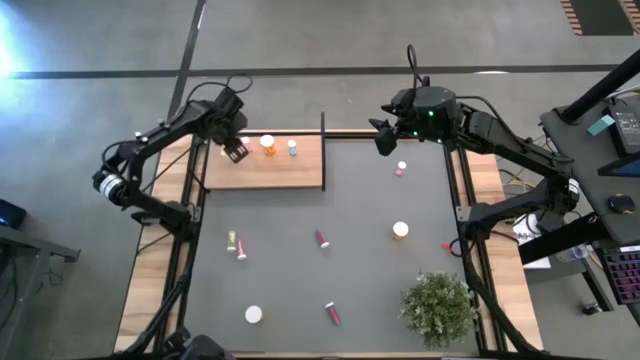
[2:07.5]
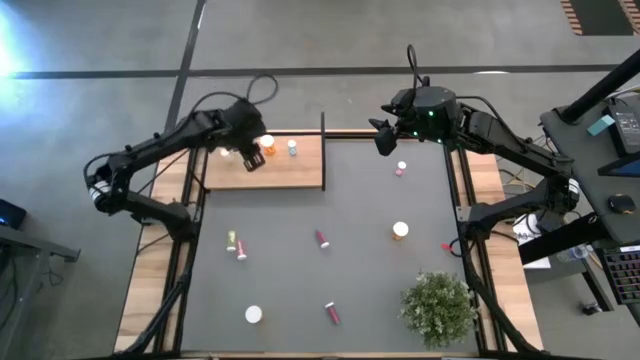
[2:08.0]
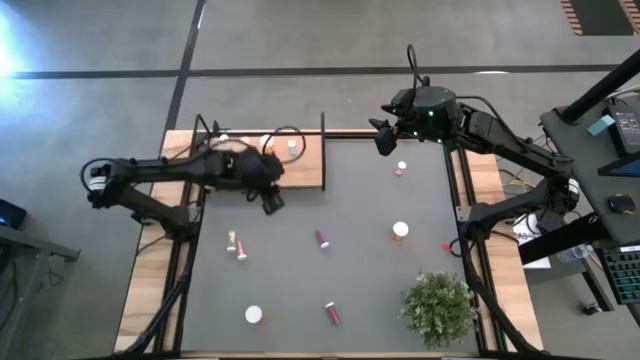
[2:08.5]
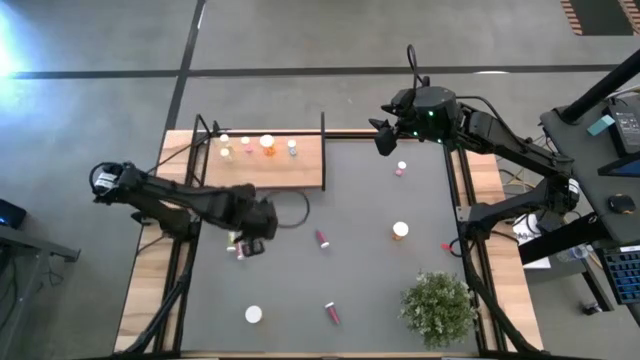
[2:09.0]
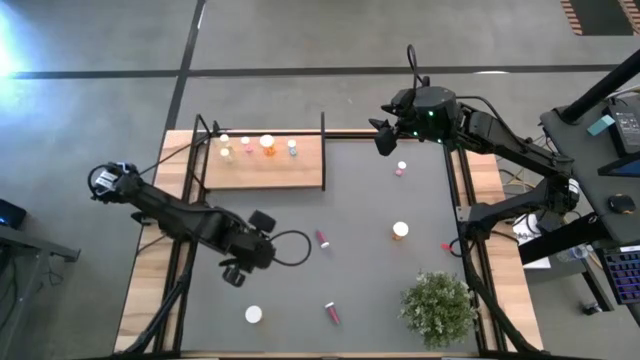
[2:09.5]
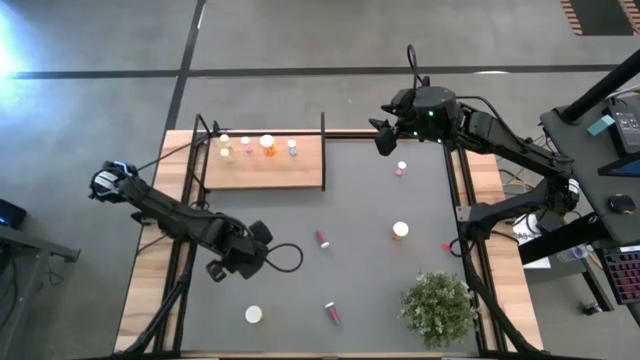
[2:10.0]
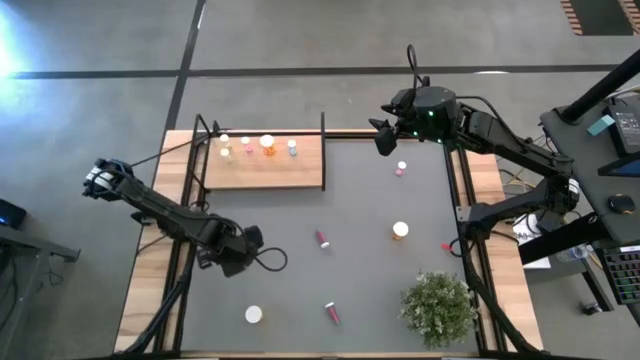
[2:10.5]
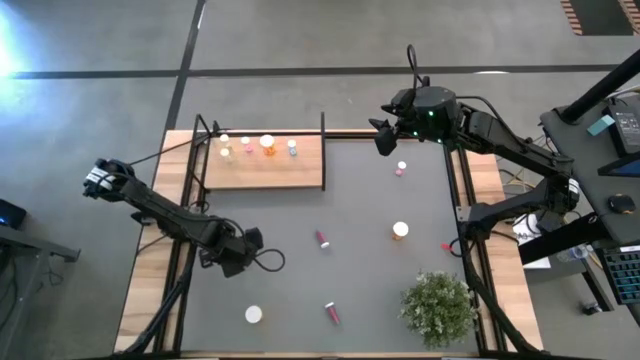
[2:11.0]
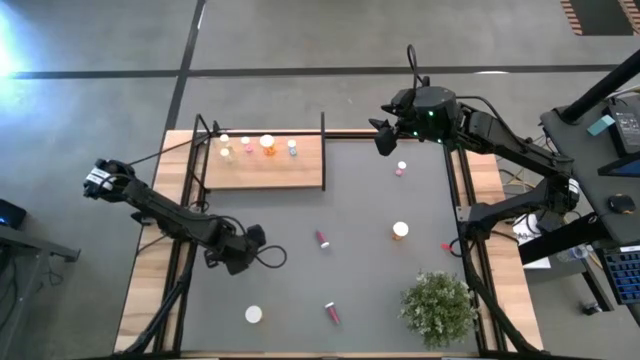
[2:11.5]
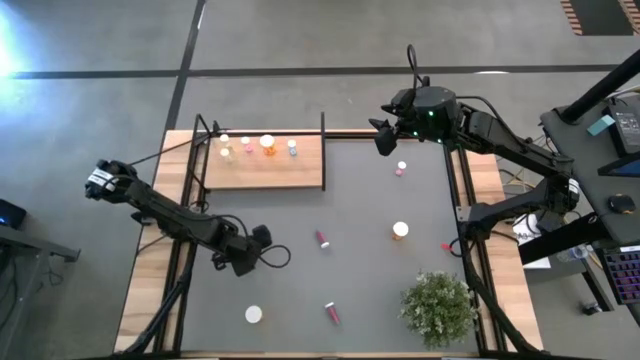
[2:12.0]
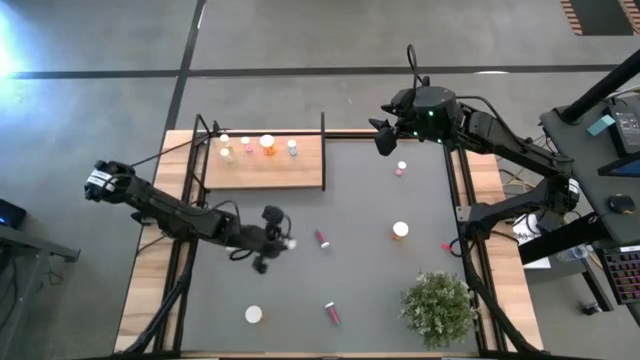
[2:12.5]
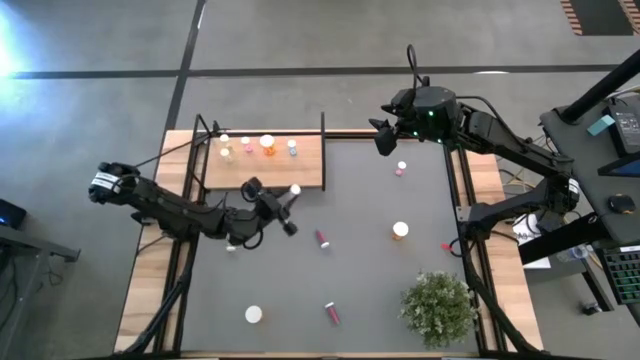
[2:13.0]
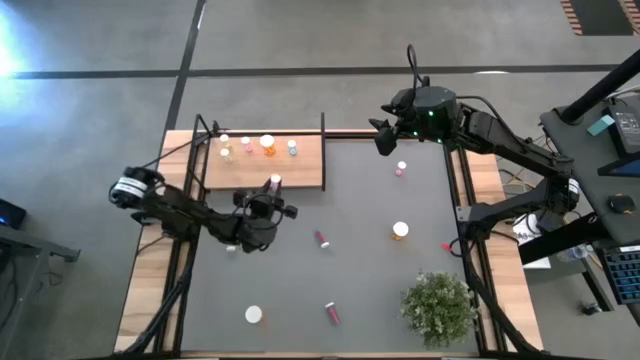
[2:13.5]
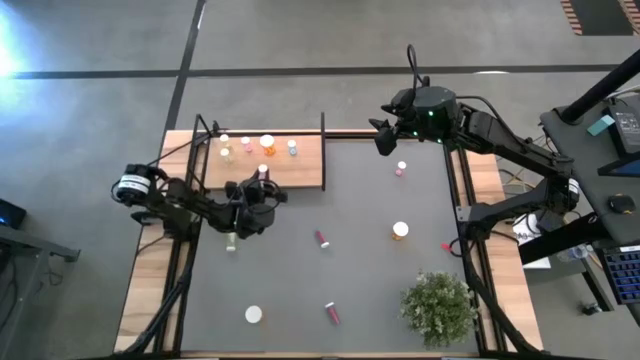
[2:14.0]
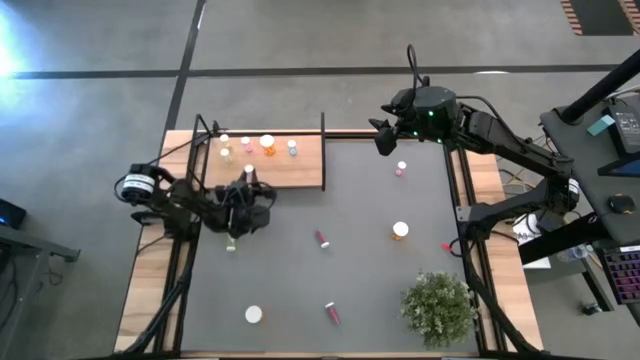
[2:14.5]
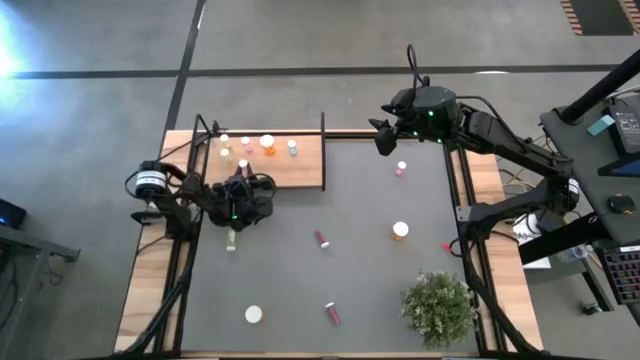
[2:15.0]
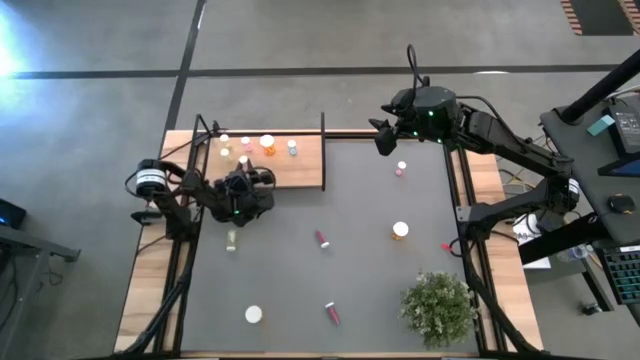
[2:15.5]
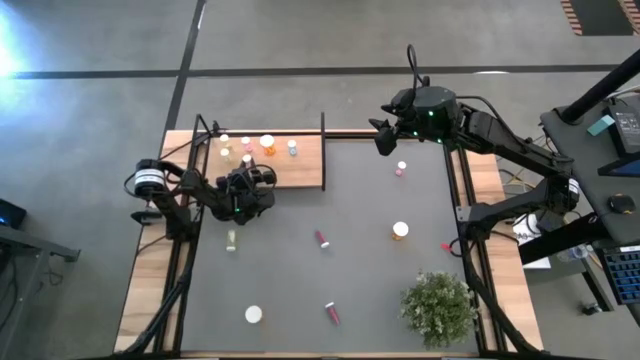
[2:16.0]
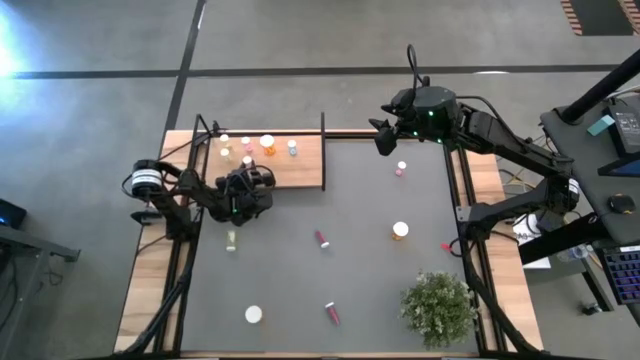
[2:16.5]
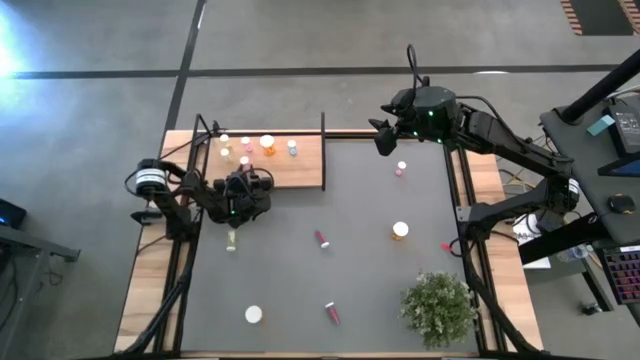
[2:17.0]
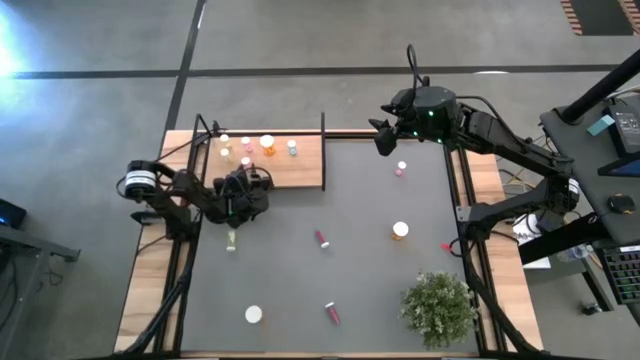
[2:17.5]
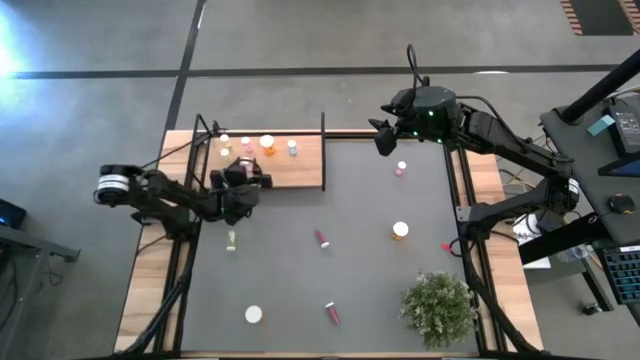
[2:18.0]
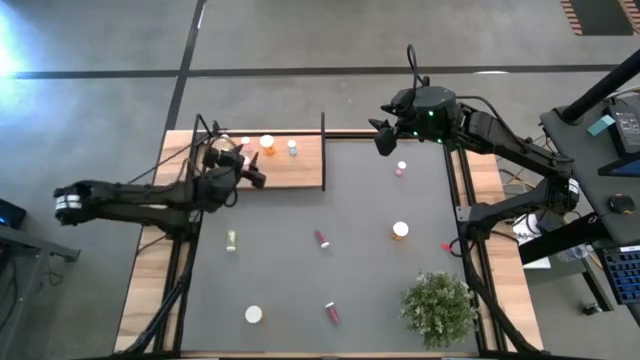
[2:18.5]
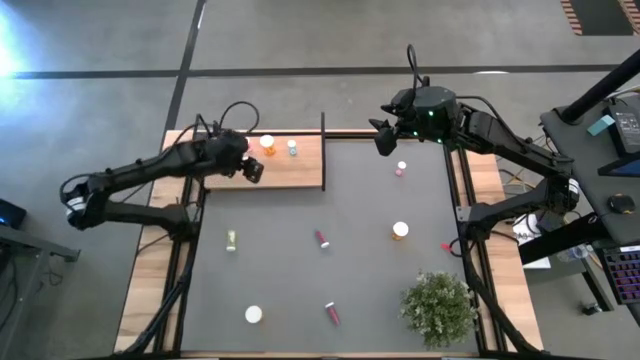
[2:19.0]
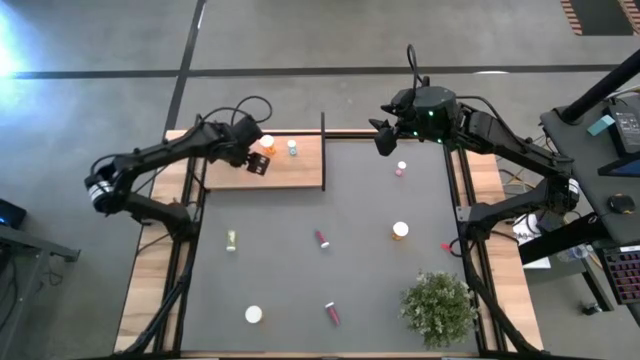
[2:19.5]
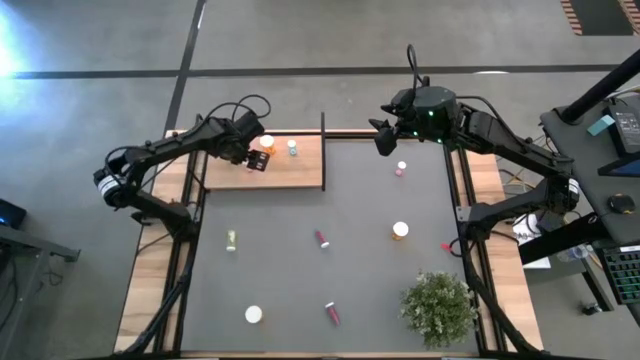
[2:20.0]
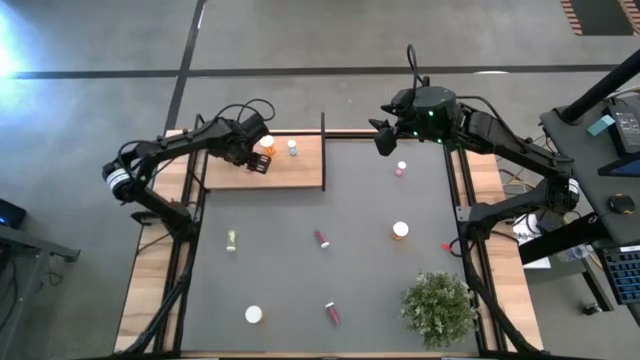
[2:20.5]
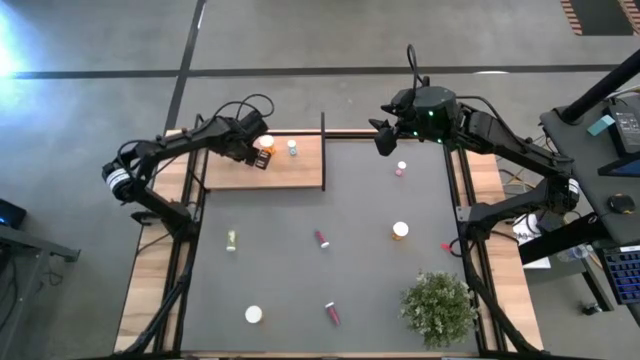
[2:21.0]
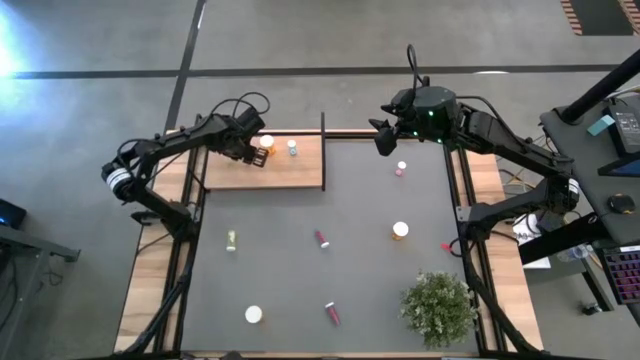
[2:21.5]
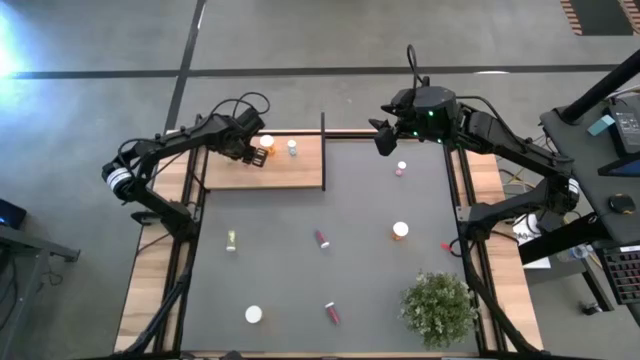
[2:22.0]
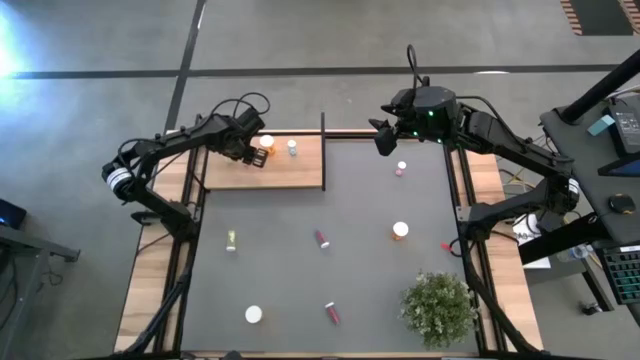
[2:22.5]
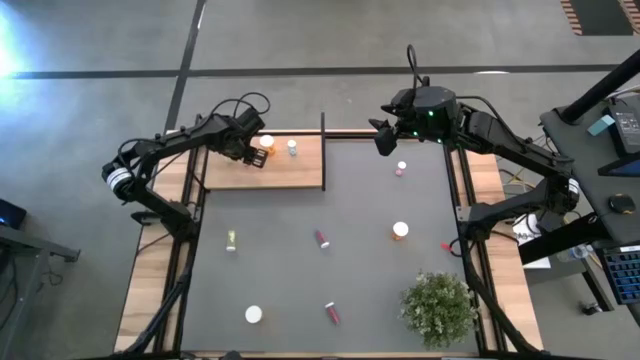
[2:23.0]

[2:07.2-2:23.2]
Task: Pick and place medicine bottles onto shelf by color
Put the left pink pill bottle on the shelf aligned with the other pink pill bottle

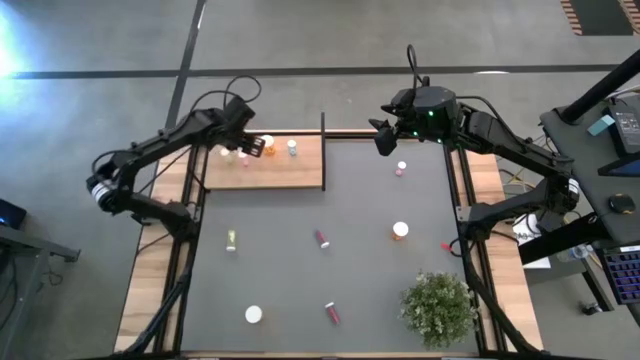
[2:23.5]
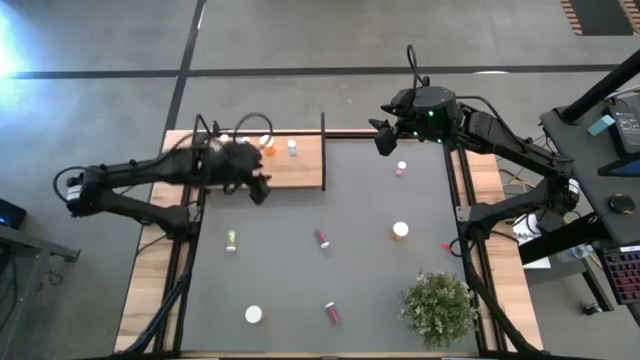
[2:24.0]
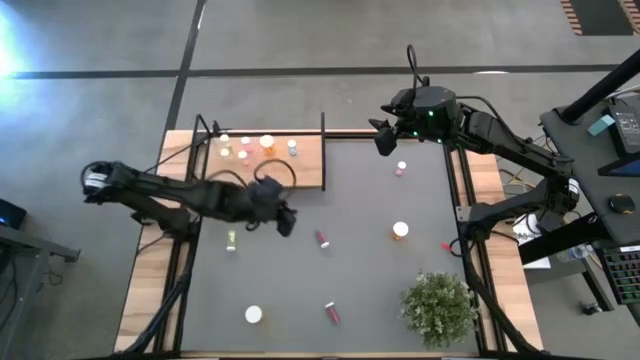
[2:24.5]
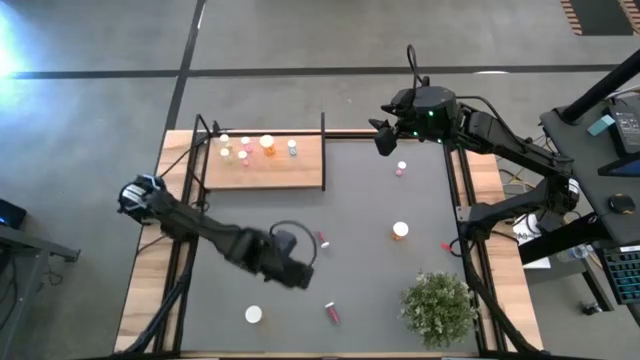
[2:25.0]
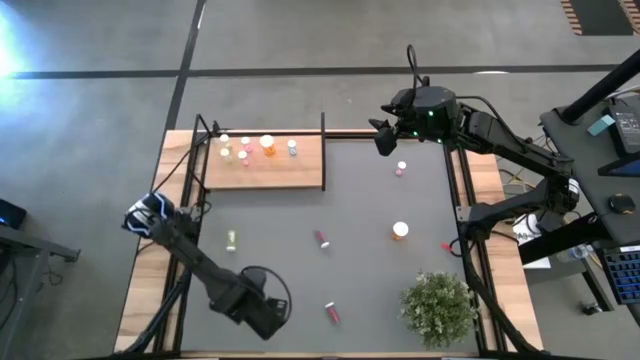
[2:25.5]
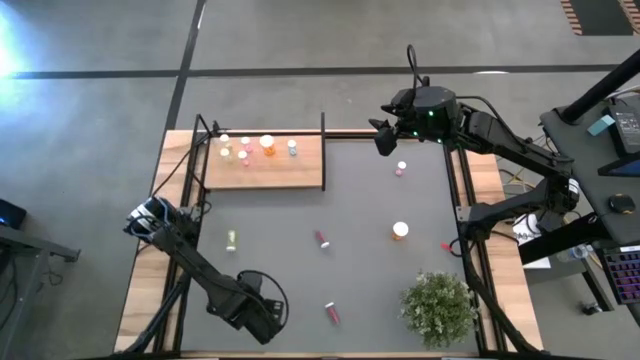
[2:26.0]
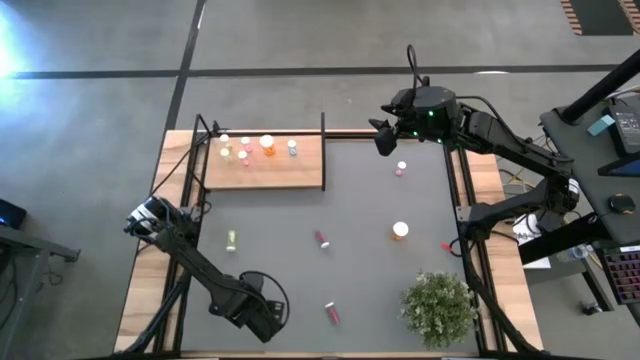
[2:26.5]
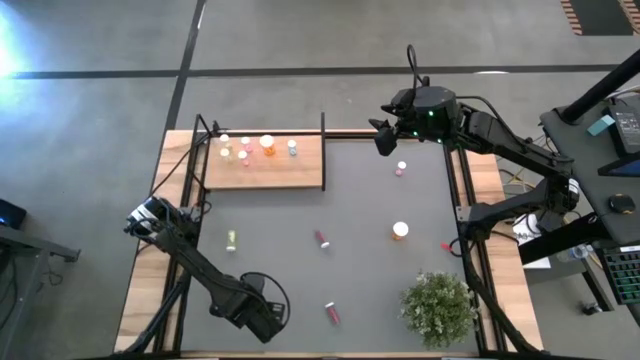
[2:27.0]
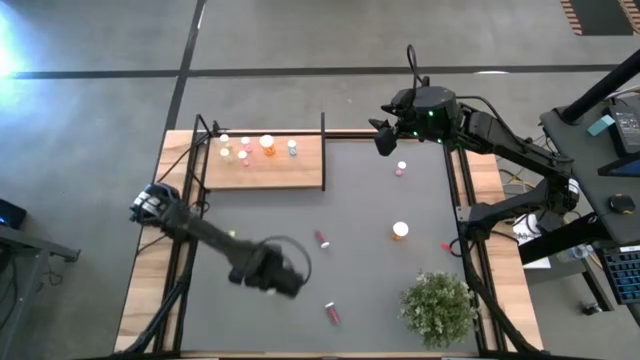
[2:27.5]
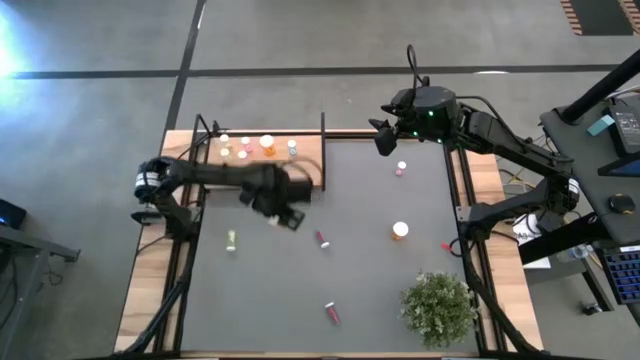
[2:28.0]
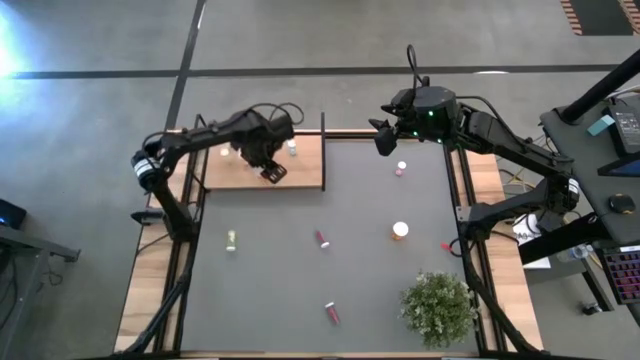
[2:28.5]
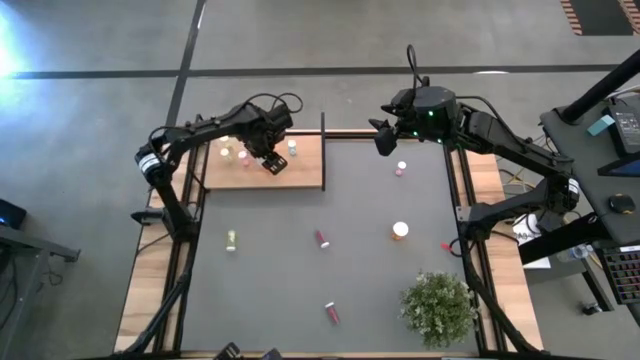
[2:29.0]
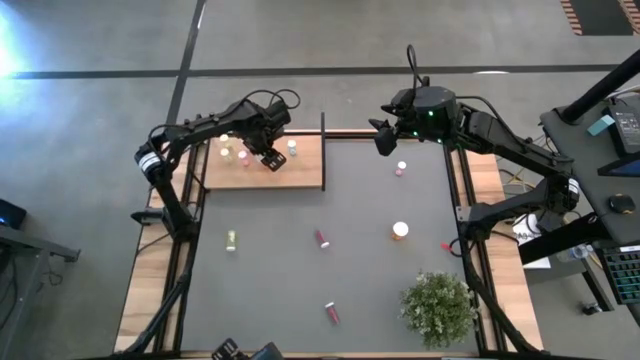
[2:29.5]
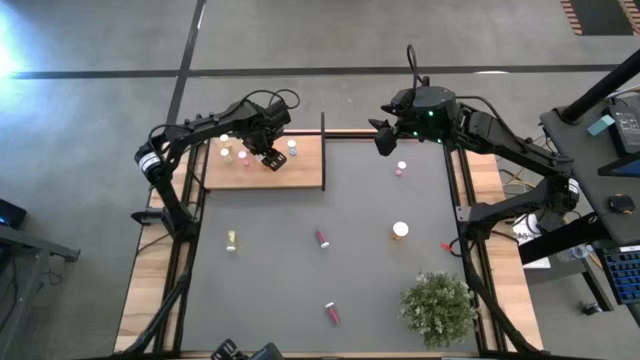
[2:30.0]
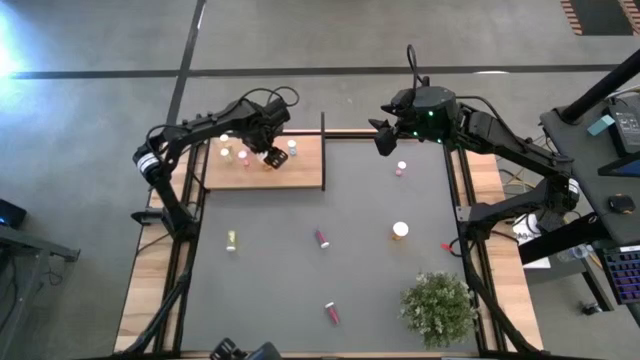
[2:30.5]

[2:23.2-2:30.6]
Put the left orange pill bottle on the shelf aligned with the other orange pill bottles
